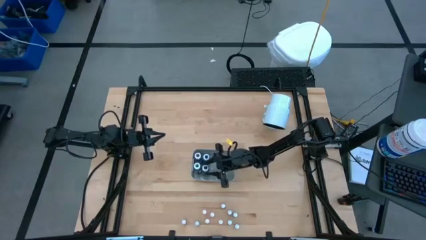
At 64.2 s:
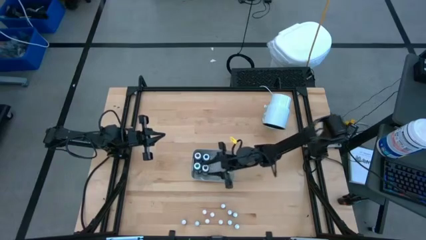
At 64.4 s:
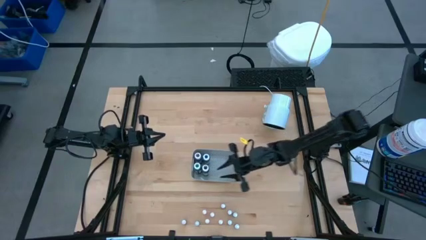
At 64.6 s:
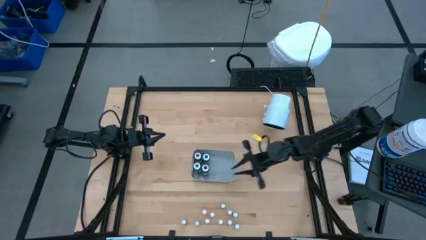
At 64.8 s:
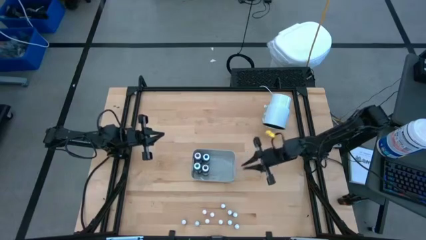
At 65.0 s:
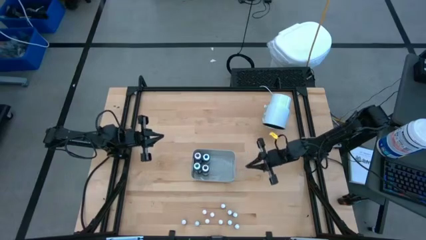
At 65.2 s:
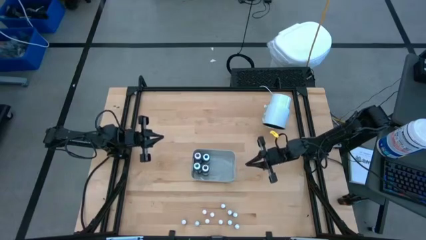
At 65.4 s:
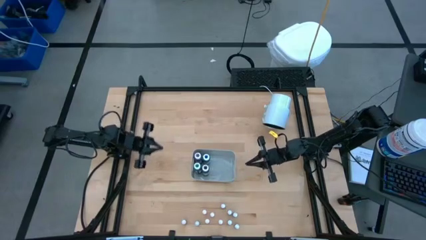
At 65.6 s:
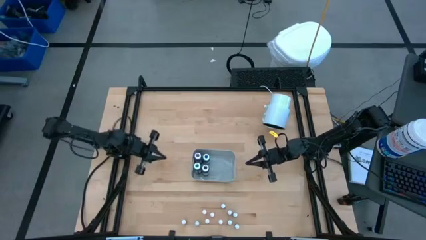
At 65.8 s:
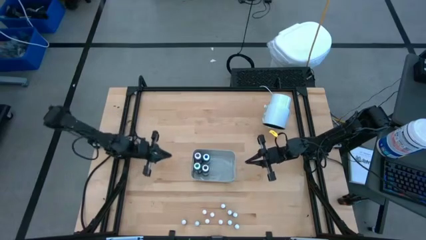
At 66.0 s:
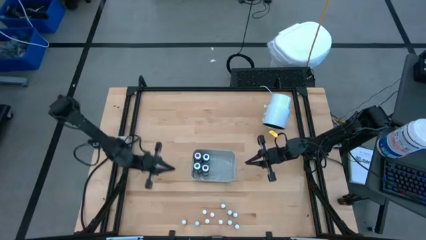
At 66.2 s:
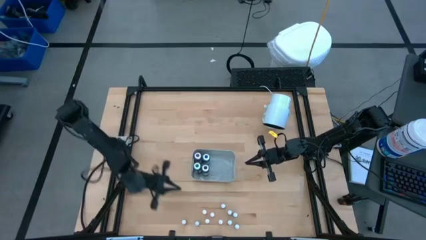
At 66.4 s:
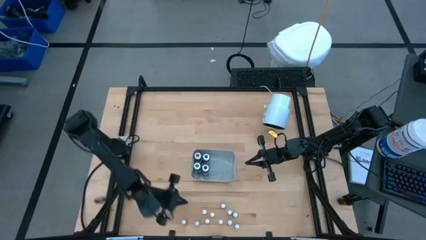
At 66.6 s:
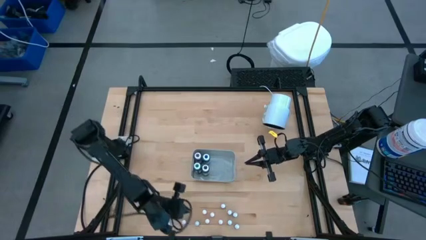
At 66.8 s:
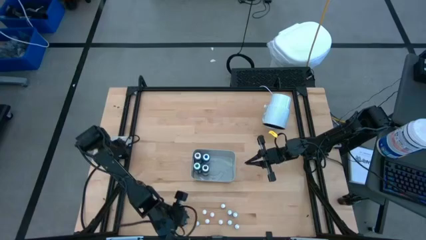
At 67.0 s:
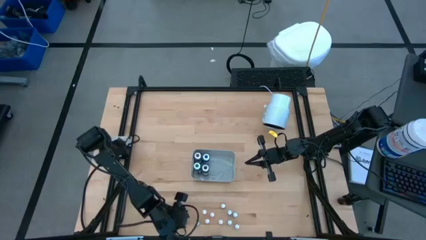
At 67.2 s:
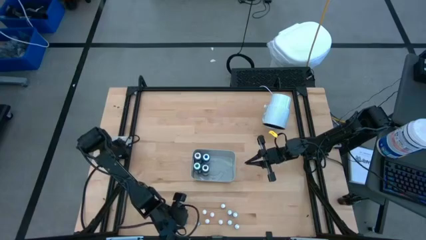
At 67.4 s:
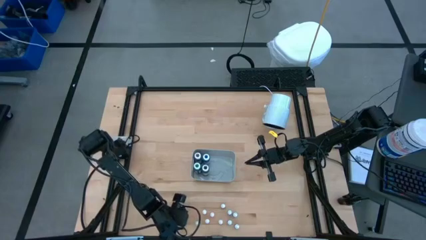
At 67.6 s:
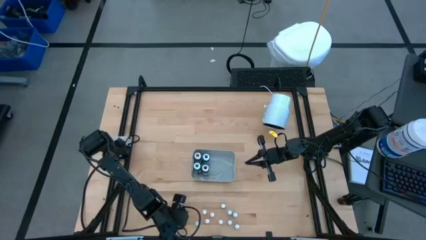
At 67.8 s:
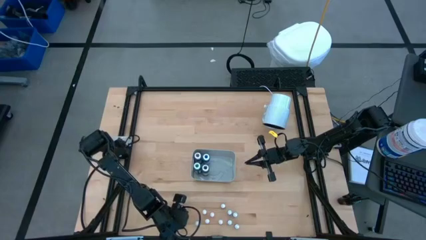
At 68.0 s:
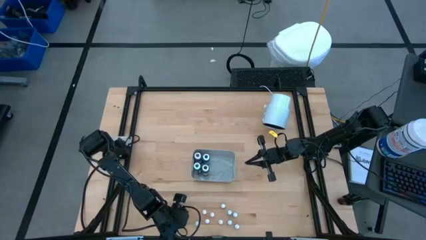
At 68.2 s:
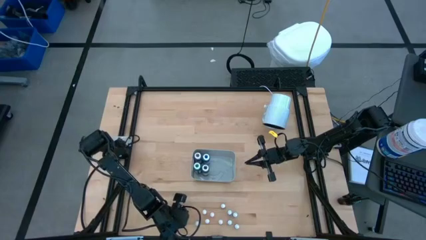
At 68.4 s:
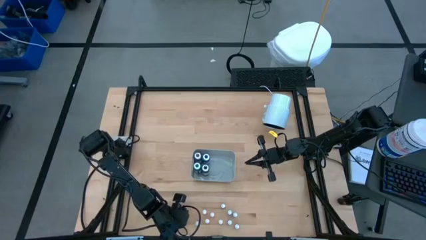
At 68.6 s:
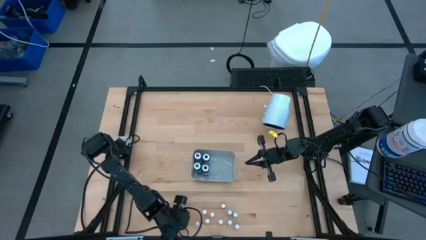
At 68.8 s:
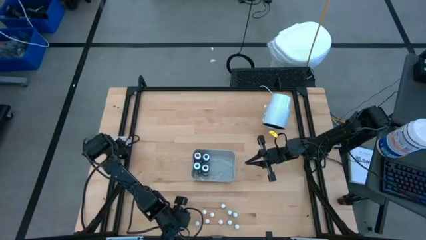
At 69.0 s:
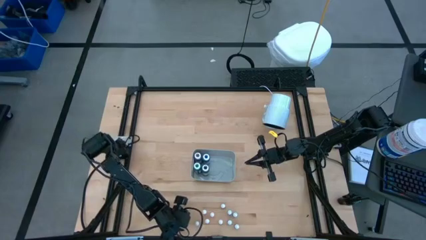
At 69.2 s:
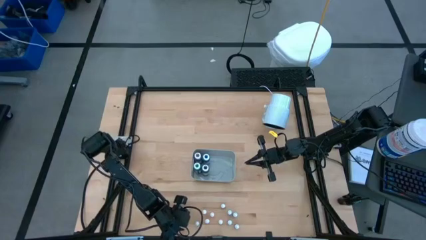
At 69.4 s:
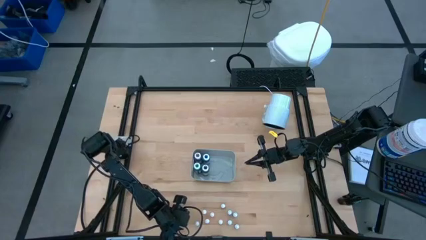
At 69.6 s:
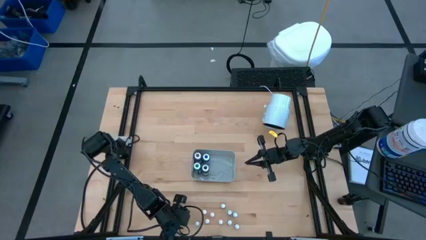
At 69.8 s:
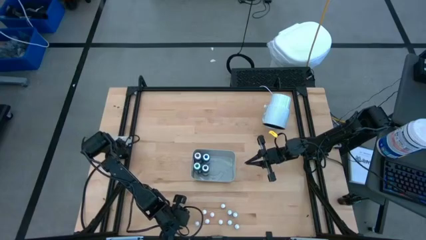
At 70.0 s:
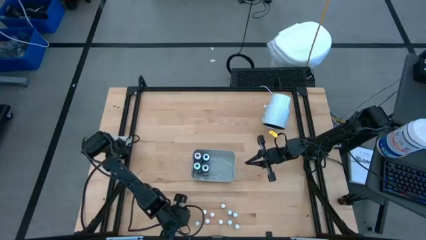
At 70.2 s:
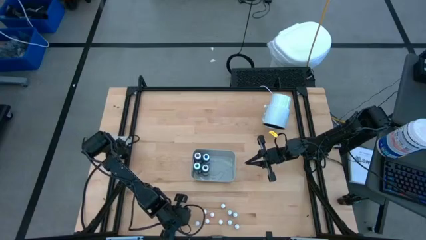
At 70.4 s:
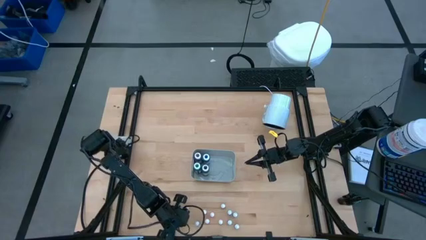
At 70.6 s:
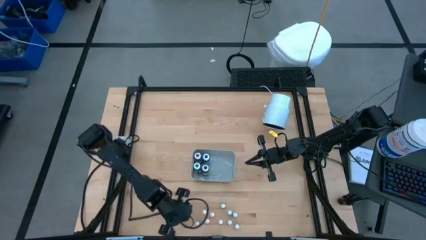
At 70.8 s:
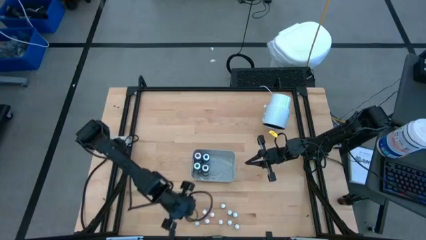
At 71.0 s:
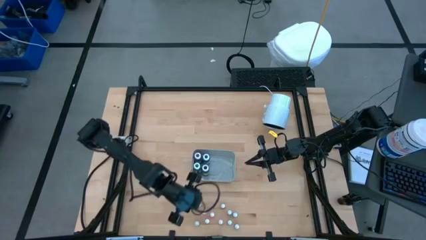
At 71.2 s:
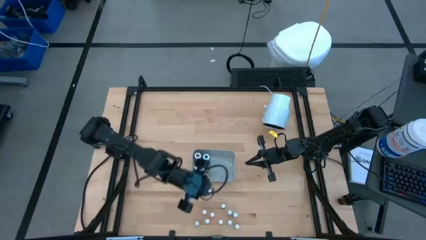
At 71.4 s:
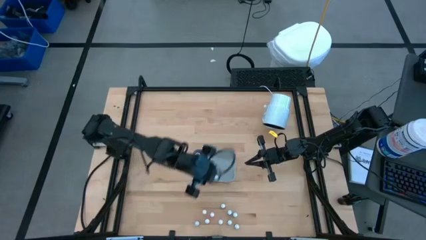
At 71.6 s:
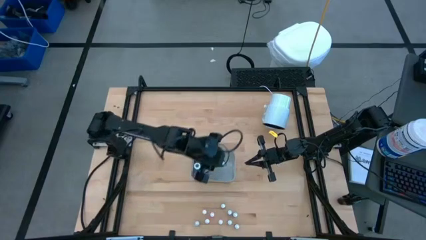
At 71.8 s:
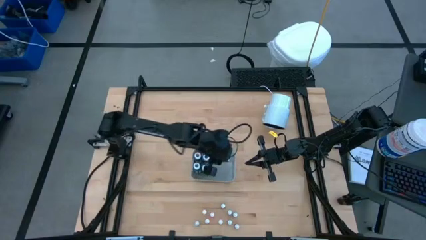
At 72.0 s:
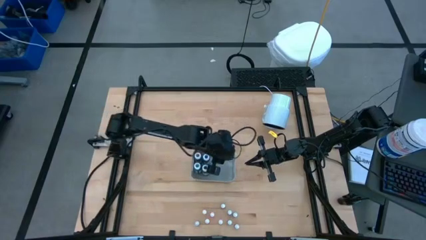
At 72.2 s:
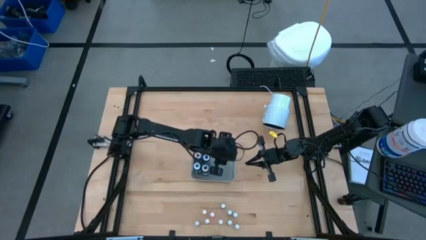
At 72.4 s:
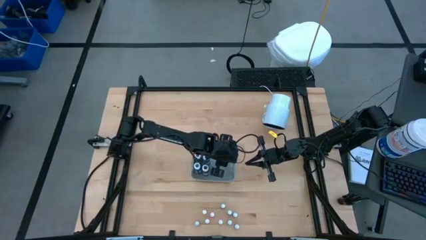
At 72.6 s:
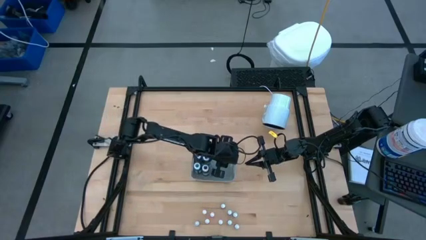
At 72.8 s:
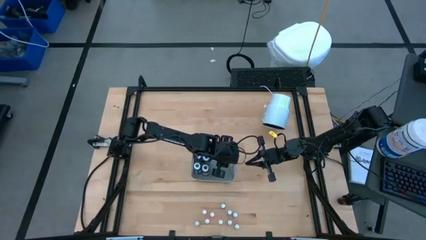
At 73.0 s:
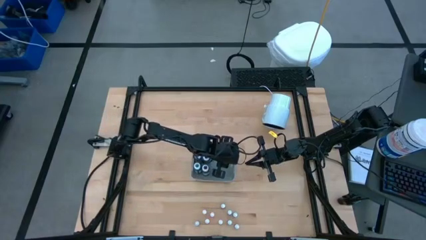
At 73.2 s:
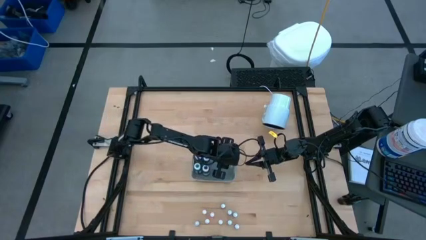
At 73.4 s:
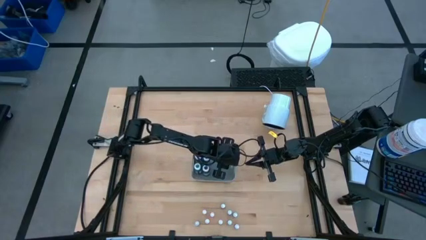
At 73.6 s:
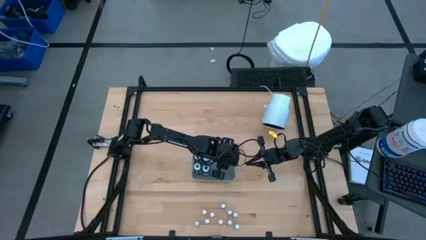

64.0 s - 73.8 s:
Task: Pick & Place food coloring
Put the small red food coloring bottle into the gray bin

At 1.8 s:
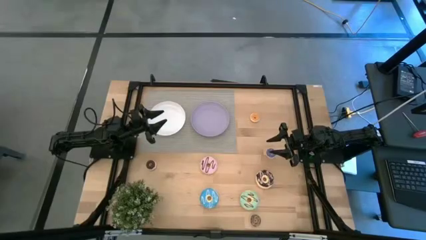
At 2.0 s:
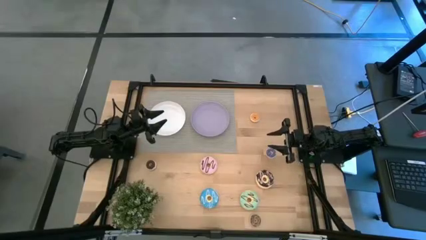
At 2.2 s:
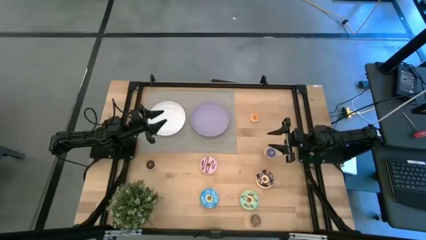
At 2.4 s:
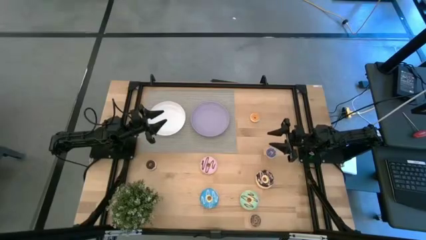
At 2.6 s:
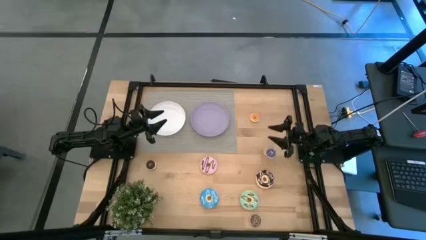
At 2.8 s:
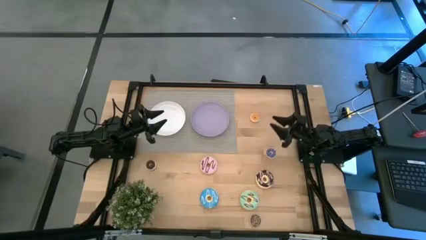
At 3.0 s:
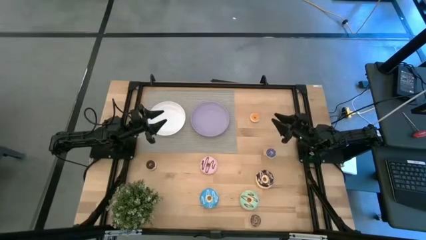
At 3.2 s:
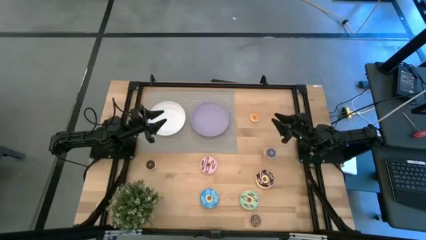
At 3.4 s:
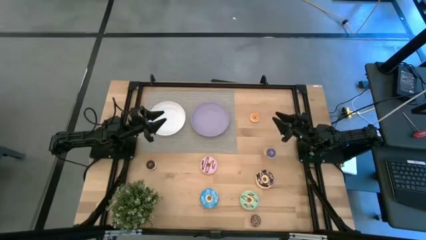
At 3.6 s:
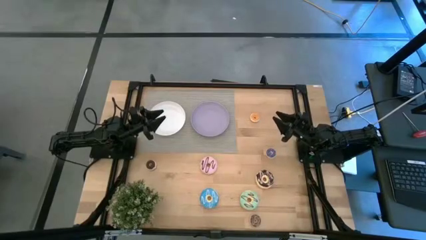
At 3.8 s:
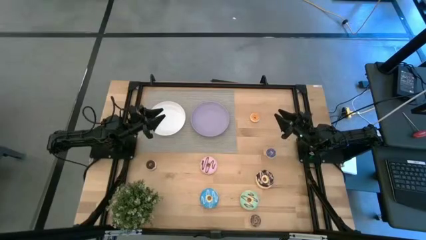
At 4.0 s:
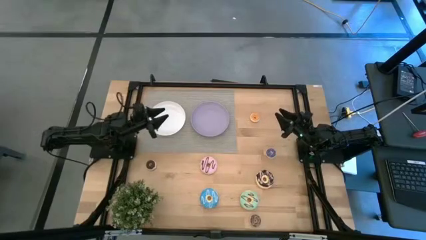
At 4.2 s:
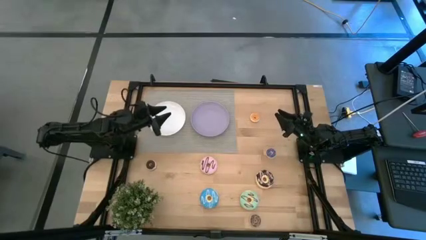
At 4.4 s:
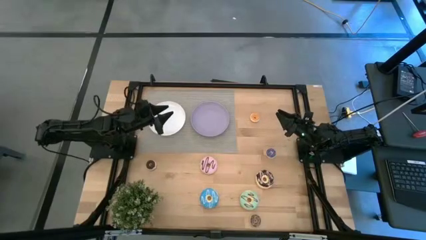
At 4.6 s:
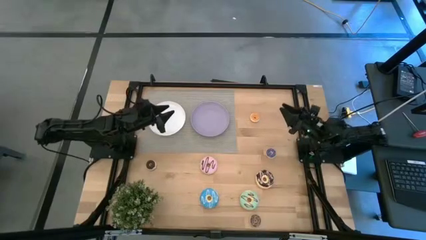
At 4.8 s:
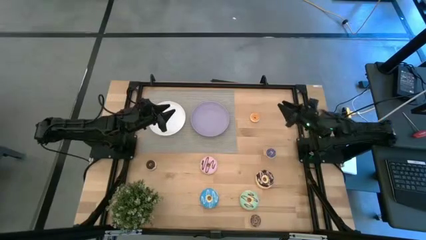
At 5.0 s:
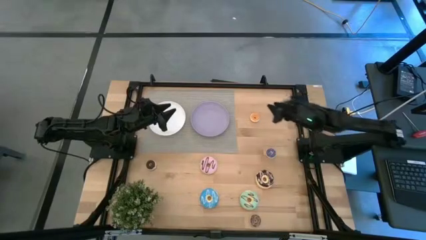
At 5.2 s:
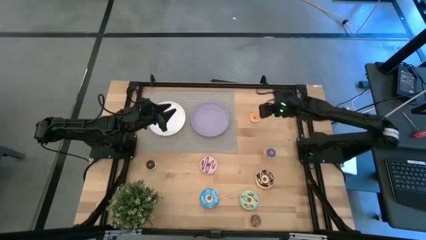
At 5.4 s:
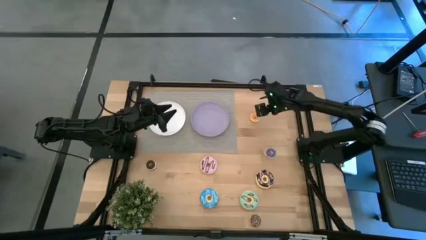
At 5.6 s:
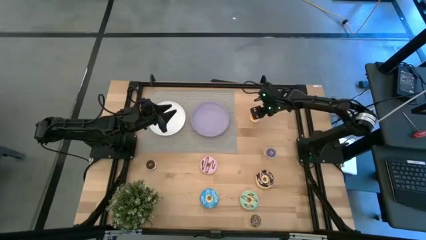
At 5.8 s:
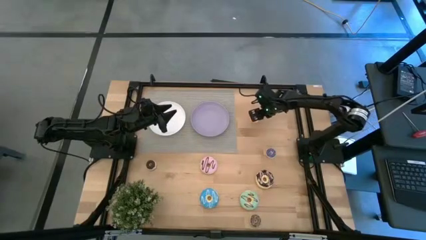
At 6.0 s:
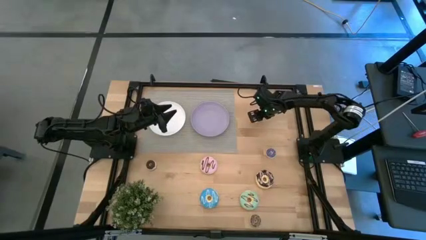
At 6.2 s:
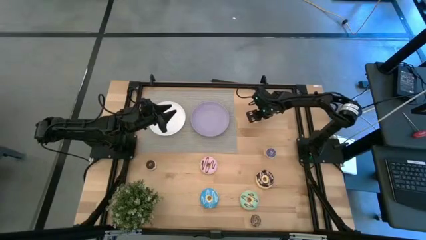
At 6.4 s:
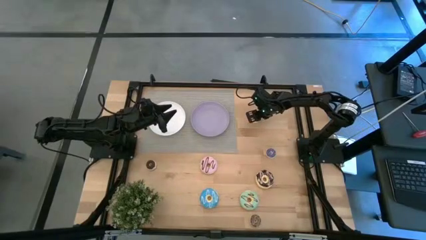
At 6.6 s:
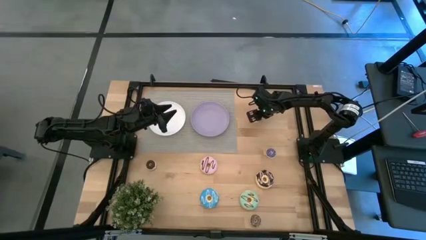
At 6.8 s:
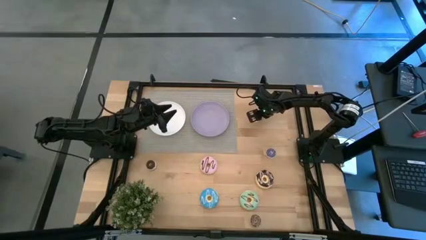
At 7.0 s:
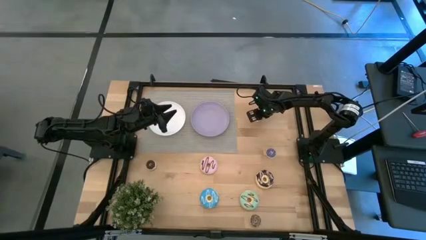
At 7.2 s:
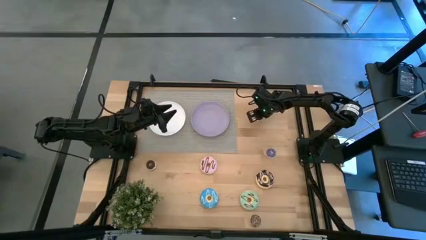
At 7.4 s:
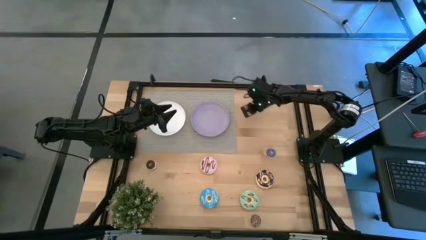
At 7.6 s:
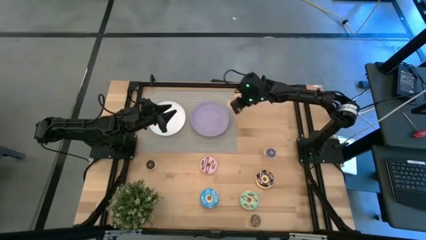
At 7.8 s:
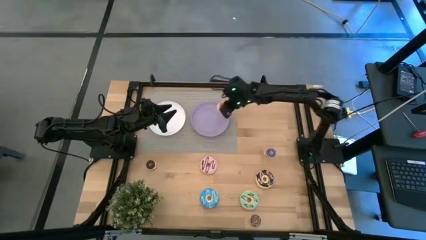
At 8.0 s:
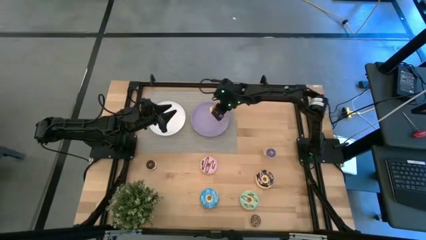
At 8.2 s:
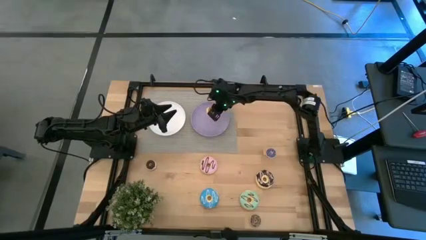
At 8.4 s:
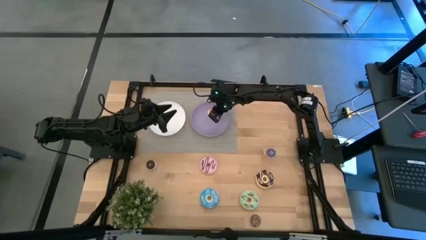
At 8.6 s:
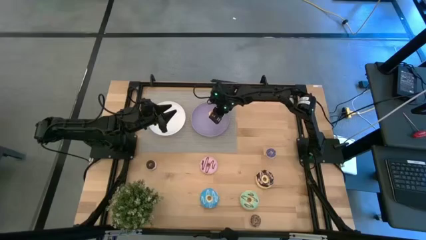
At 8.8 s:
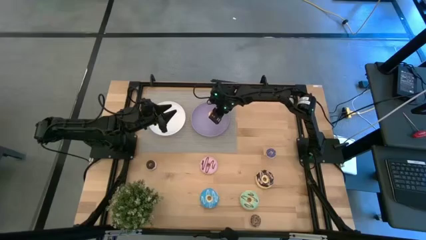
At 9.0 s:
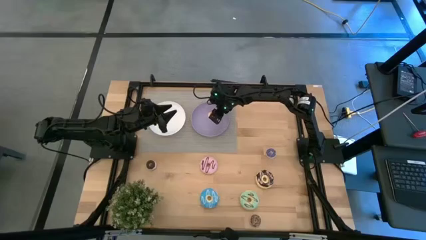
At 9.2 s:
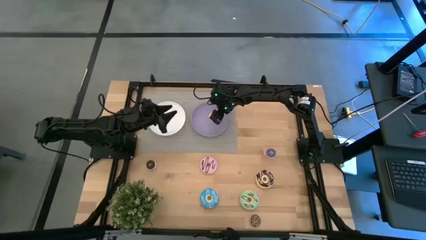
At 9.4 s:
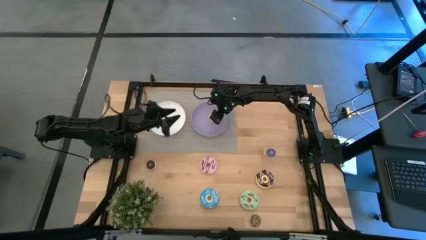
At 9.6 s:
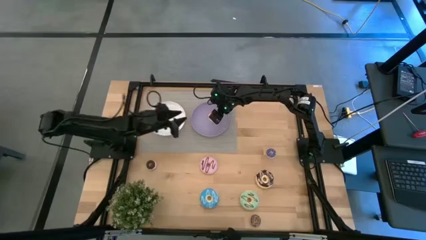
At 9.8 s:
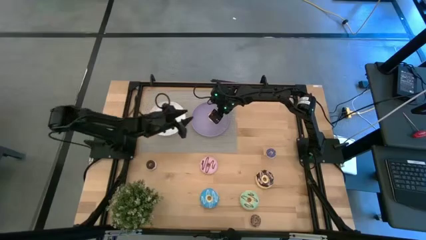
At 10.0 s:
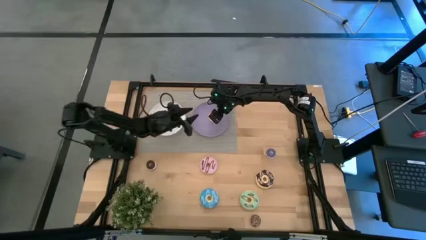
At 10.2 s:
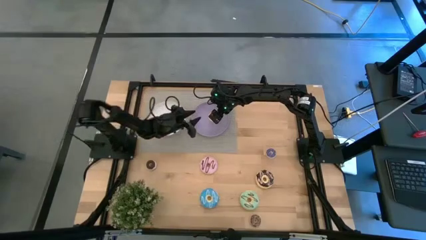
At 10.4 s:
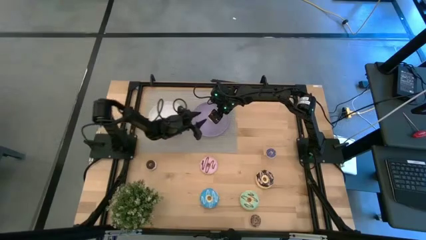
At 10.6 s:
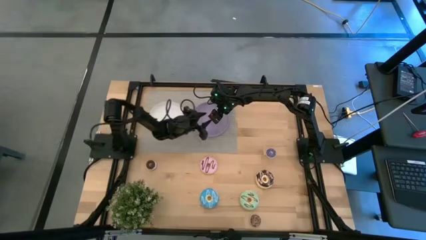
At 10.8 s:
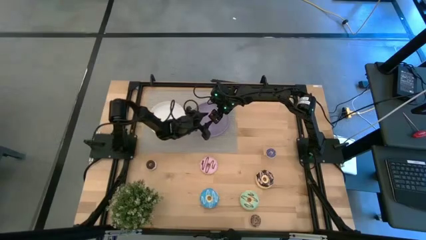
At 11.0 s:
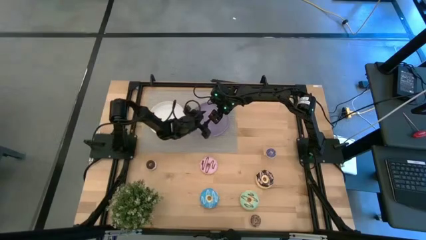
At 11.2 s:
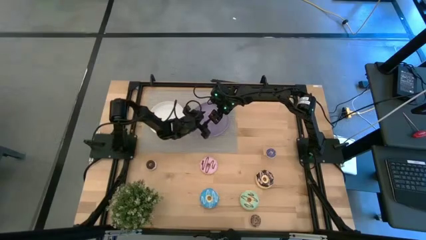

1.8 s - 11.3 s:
Task: Pick & Place donuts
Put the small orange donut on the purple plate
